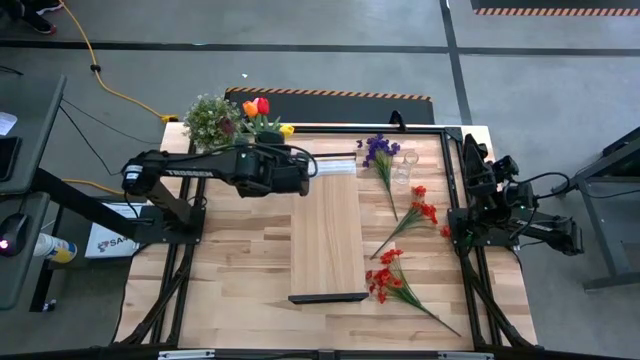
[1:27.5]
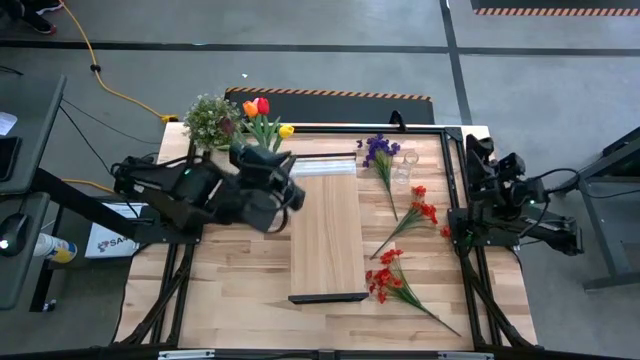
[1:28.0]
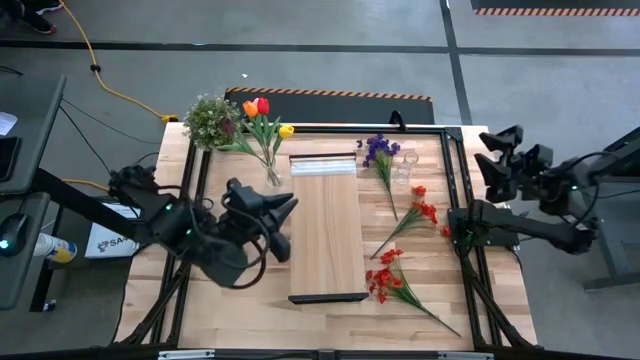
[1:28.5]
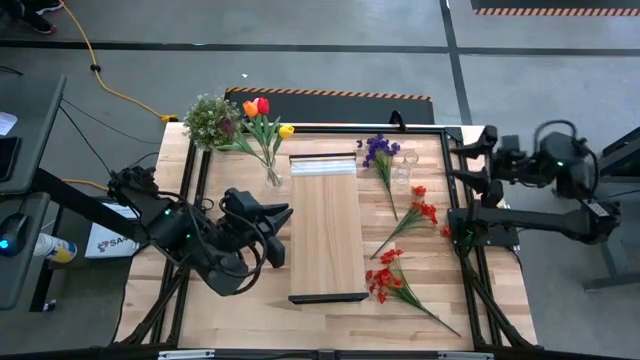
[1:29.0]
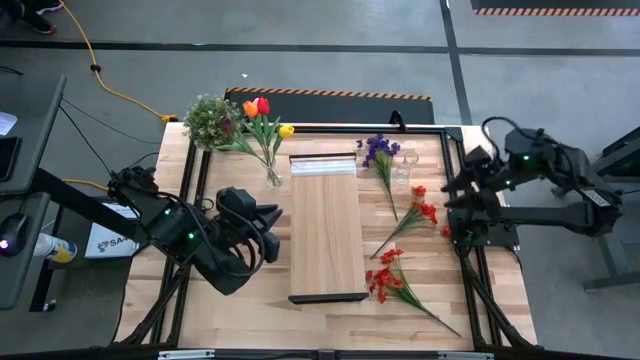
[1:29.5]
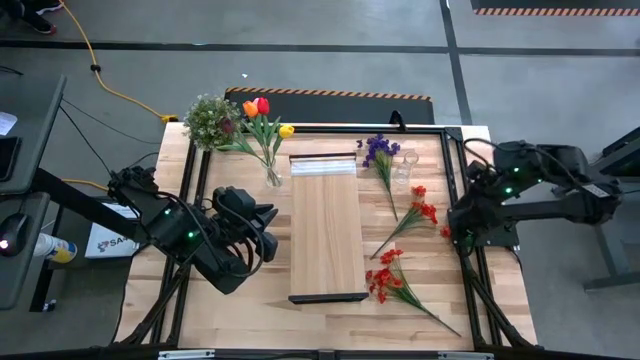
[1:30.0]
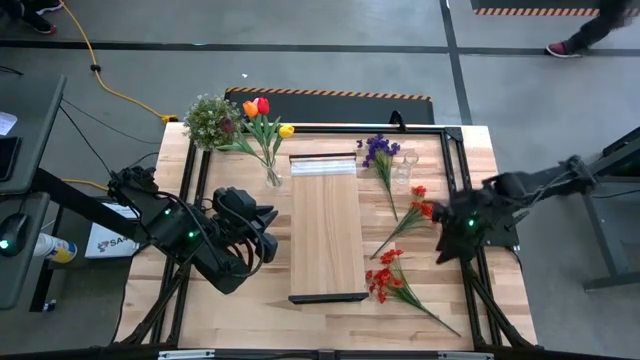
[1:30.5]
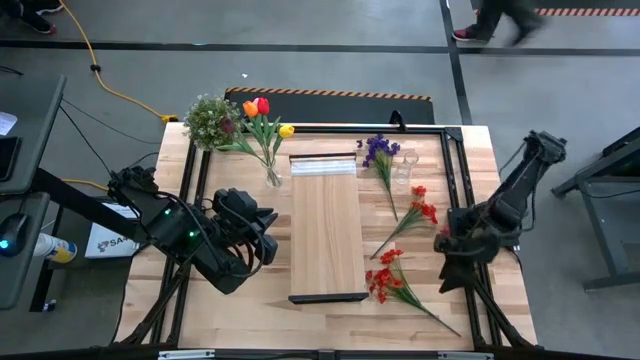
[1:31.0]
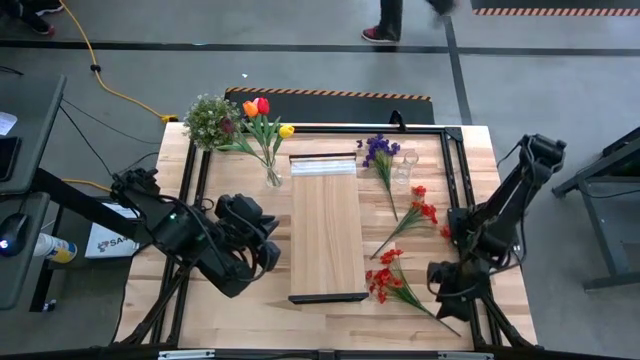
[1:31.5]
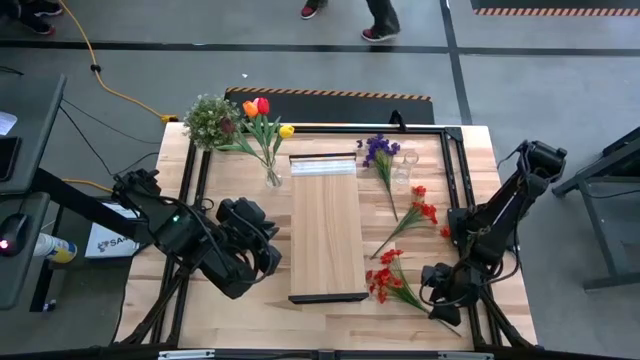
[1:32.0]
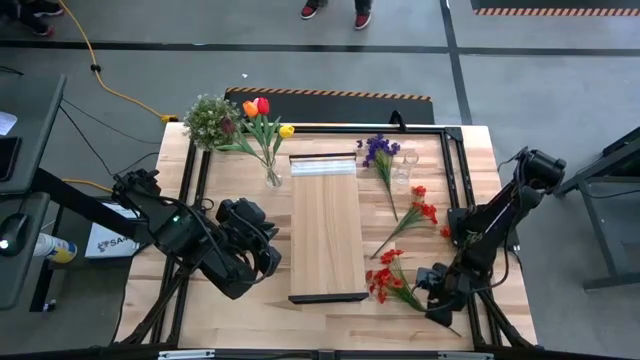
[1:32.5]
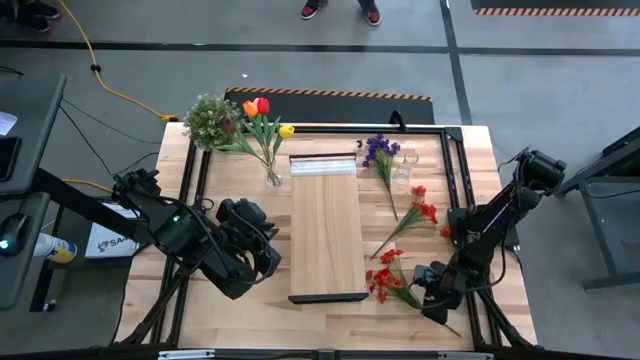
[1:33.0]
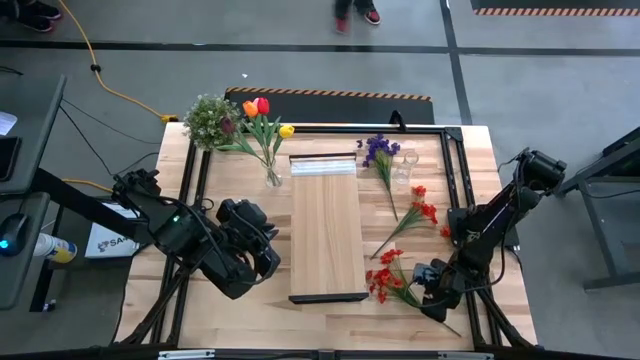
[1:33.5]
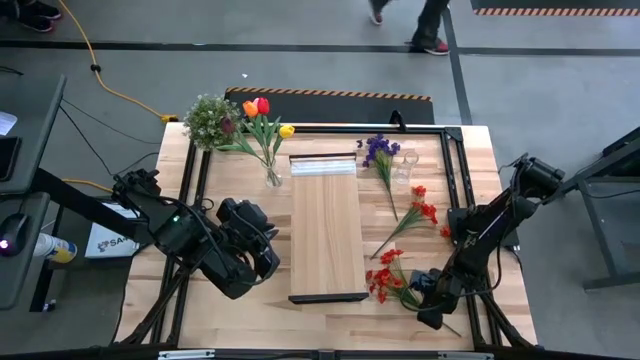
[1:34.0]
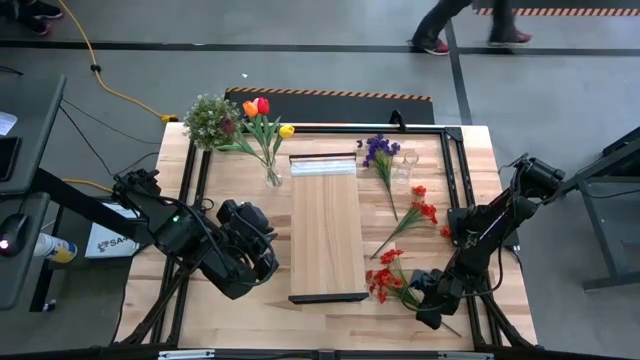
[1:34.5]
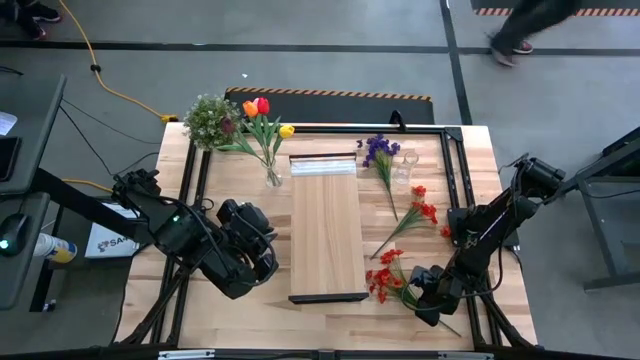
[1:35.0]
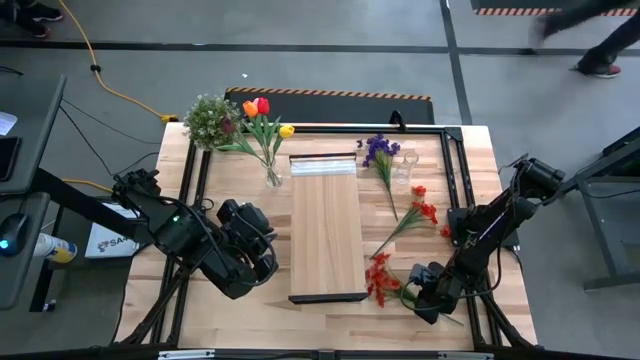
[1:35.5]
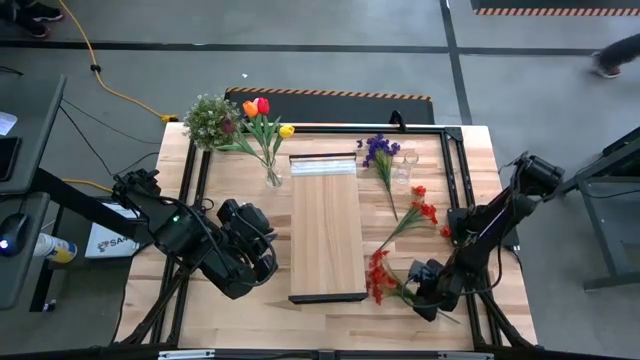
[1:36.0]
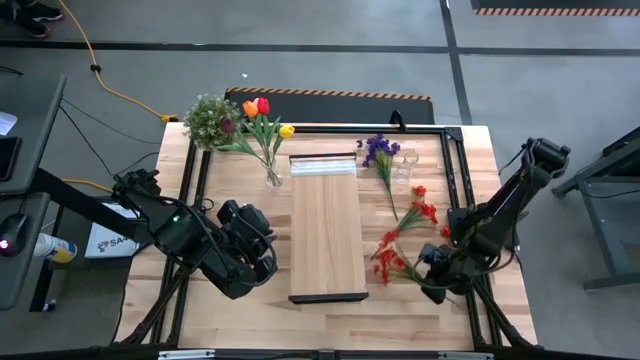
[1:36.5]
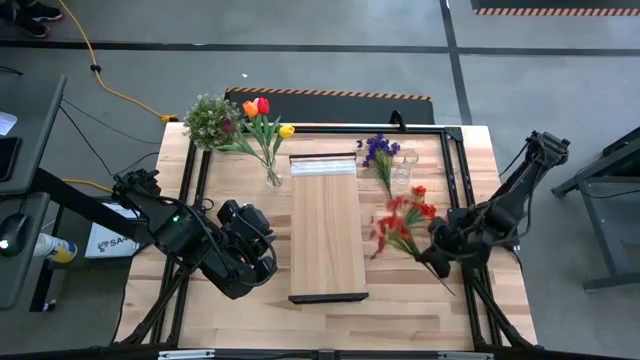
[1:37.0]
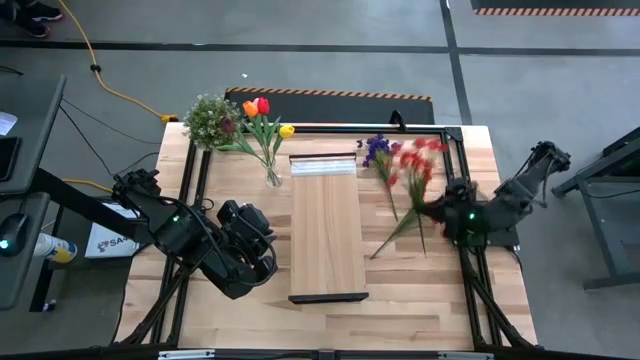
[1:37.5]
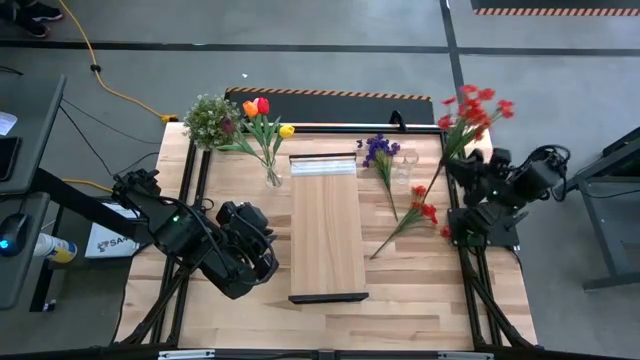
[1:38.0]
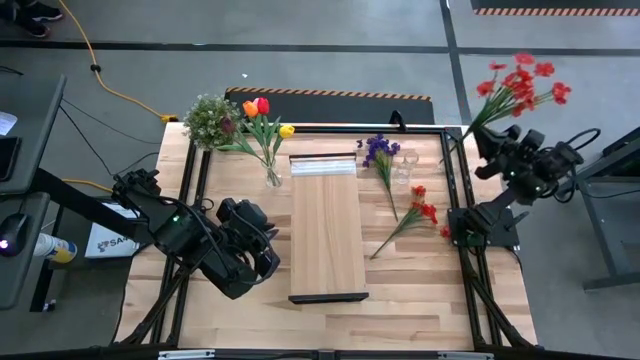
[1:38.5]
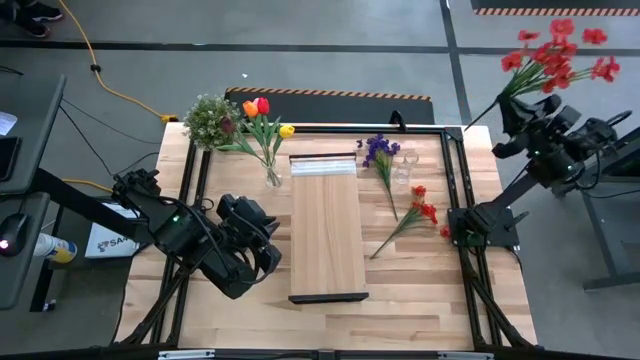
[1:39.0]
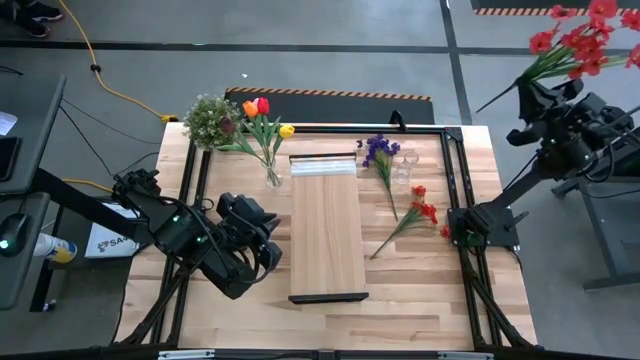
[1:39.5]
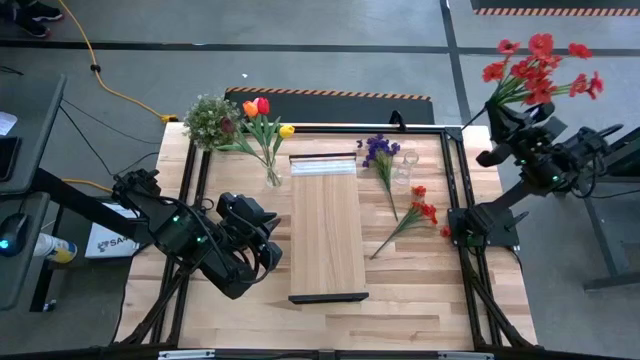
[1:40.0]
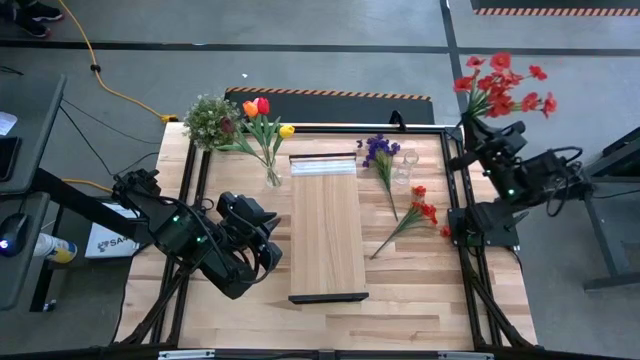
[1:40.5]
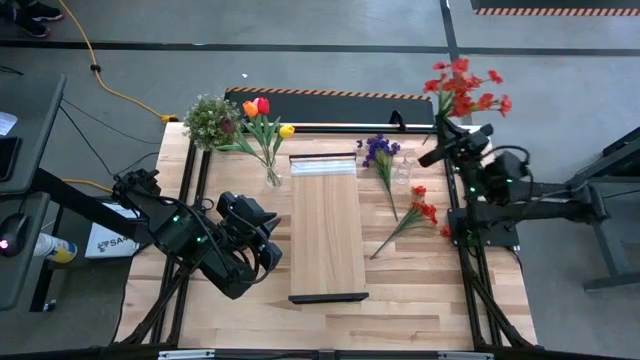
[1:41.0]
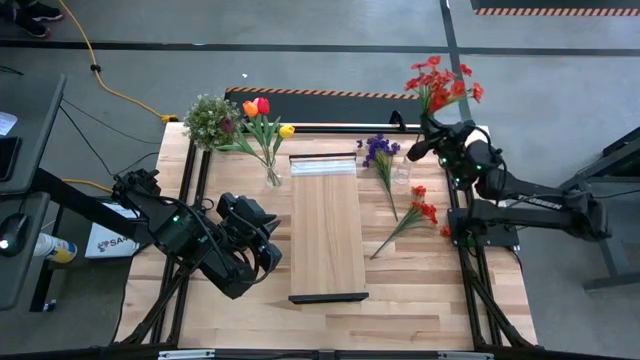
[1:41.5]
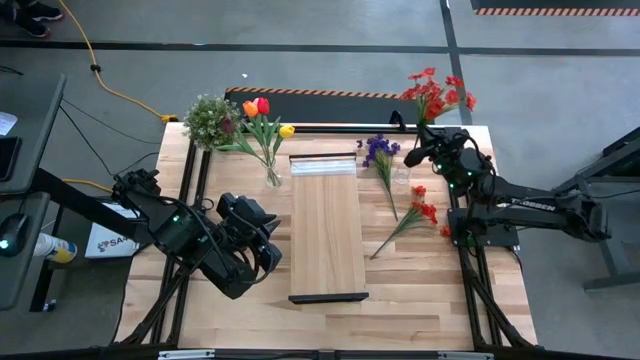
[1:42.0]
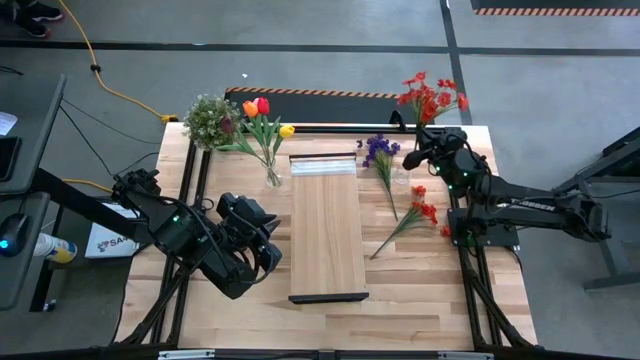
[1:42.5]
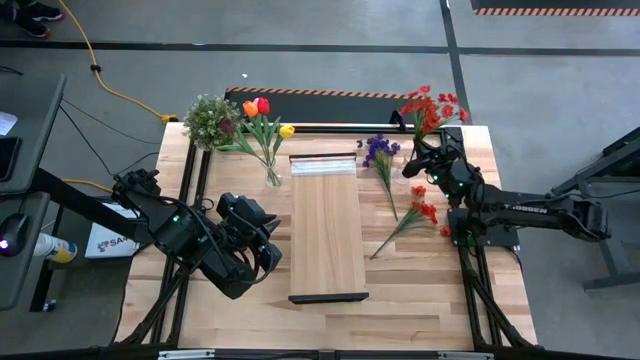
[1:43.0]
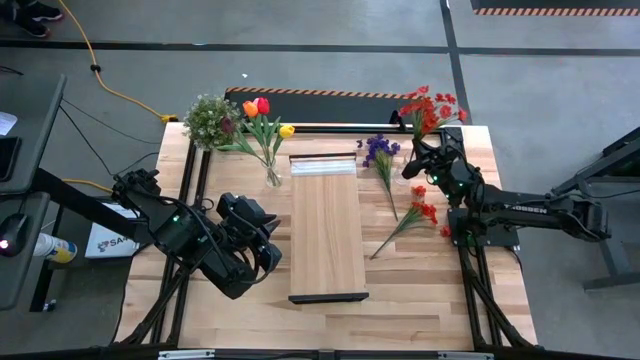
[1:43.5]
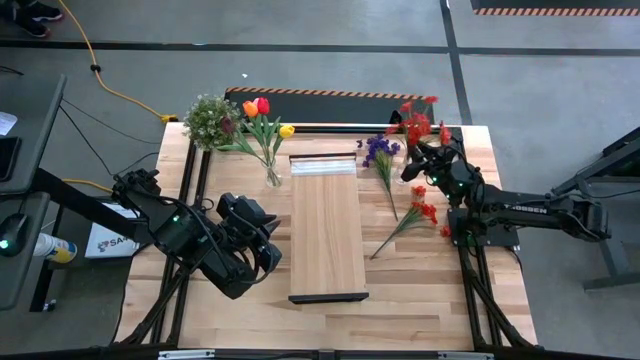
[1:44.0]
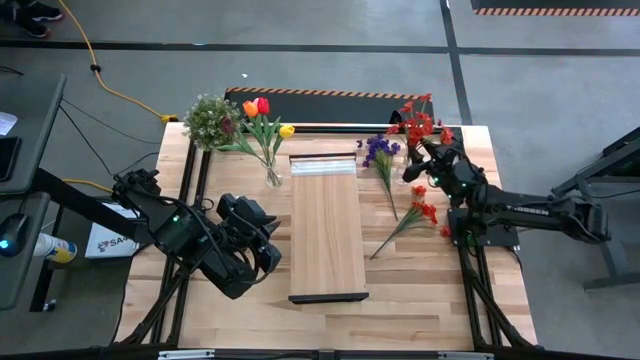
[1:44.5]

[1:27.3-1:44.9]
Task: Pick and place flowers into a vace then onto a shelf
Put the bottom orange flowers into the right transparent vase

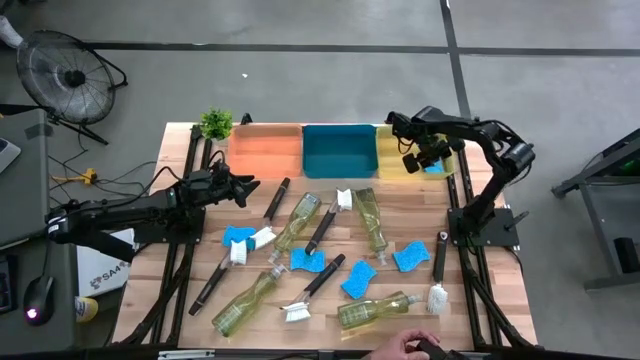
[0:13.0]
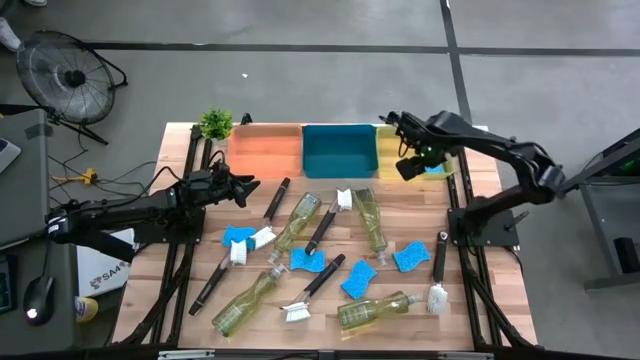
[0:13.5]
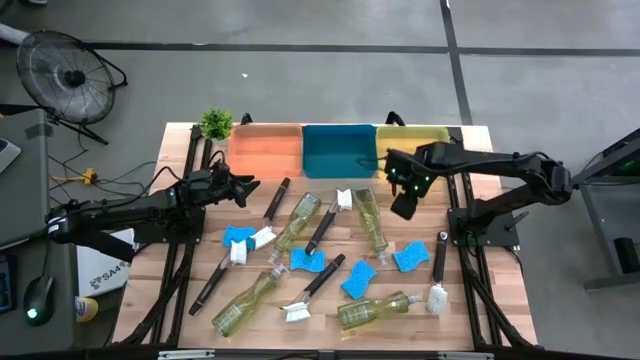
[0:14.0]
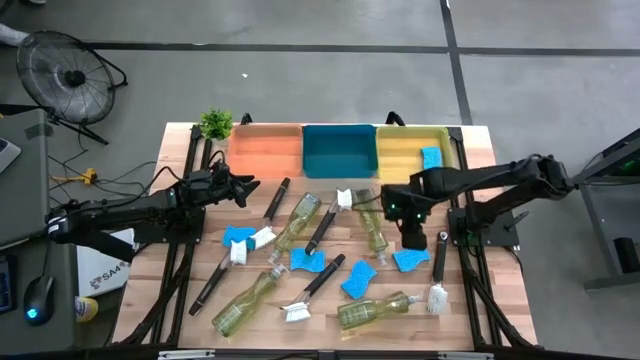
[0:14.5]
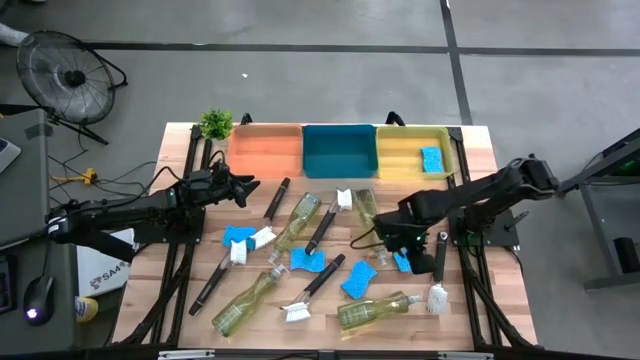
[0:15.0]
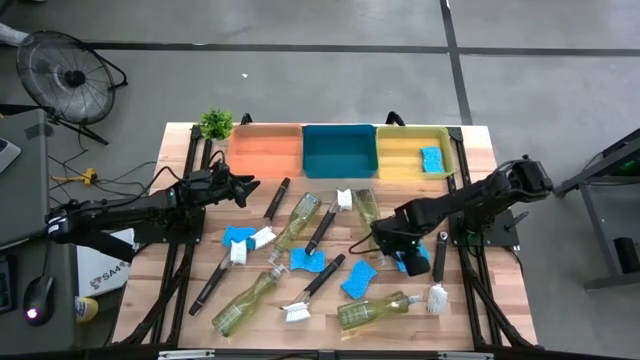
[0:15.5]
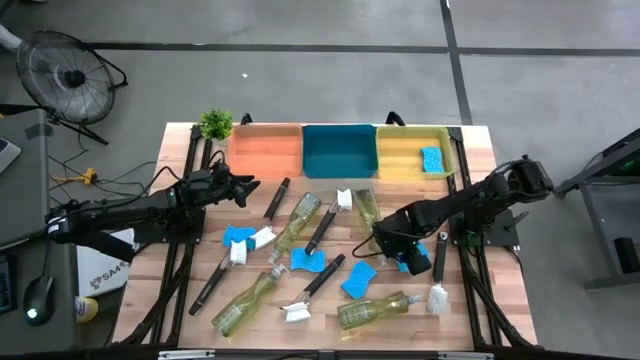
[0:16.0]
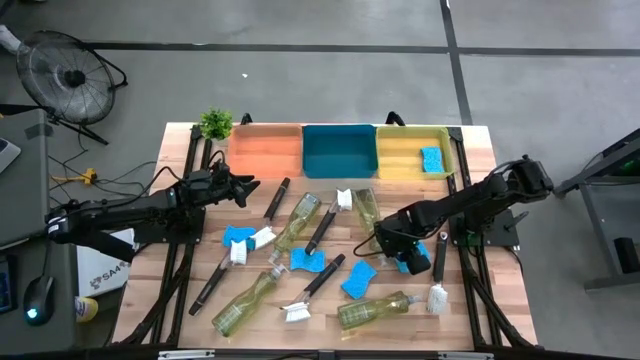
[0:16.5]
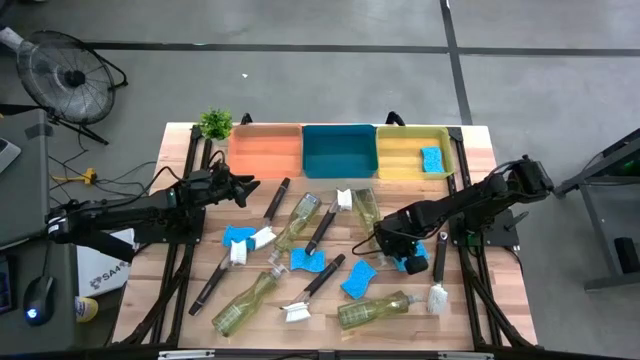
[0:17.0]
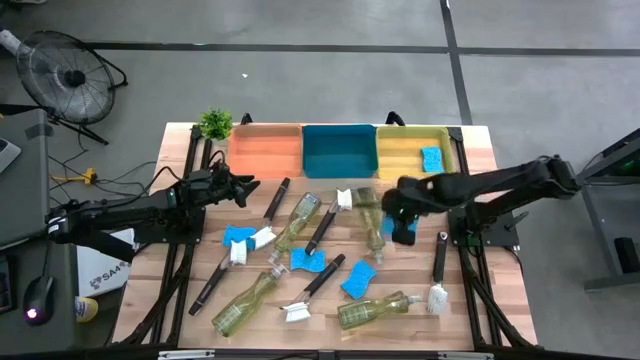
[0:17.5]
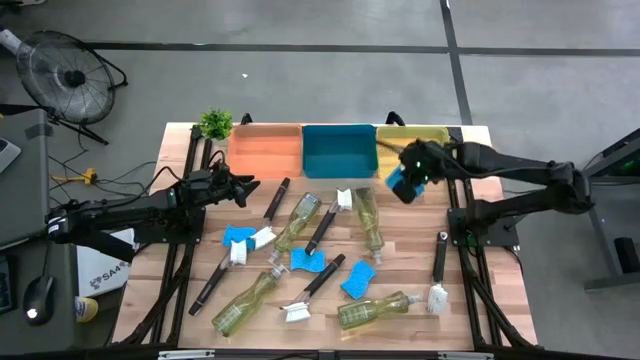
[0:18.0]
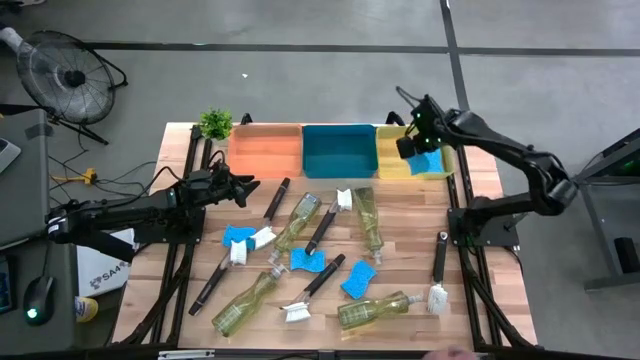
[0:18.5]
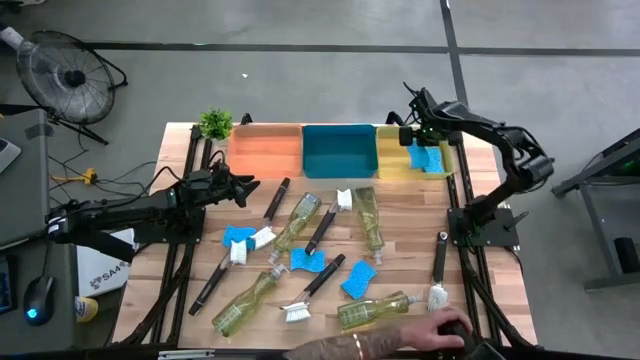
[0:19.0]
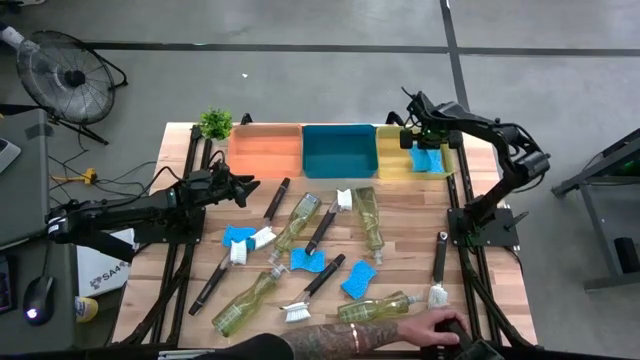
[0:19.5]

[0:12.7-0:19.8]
Task: Pick & Place Kitchen Sink Supplies
Put the blue sponge into the yellow bin
